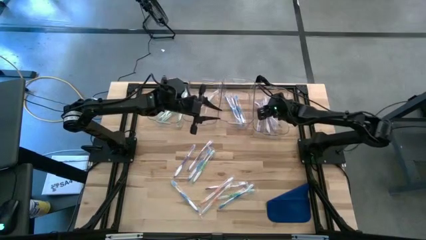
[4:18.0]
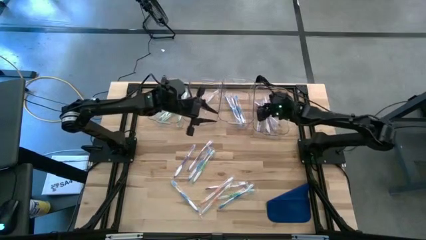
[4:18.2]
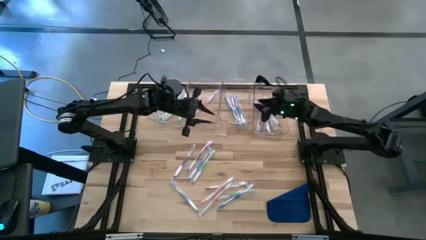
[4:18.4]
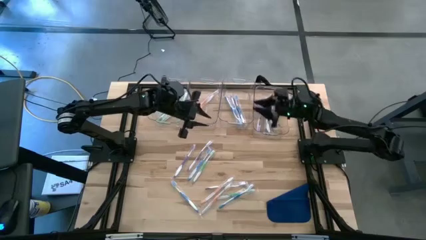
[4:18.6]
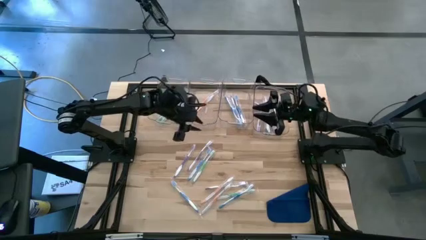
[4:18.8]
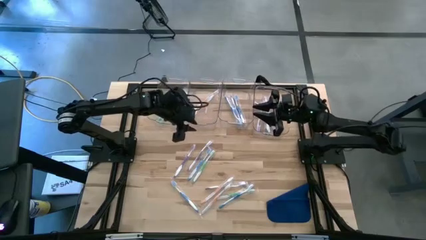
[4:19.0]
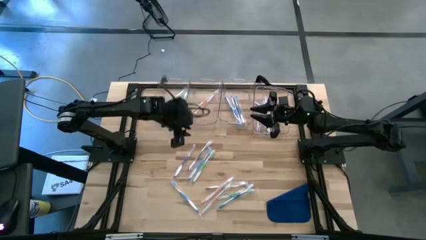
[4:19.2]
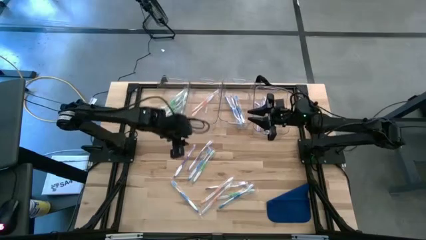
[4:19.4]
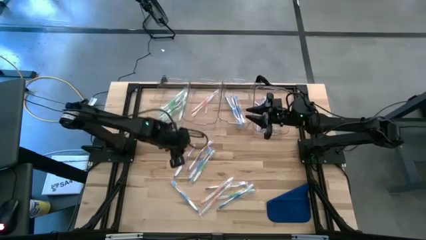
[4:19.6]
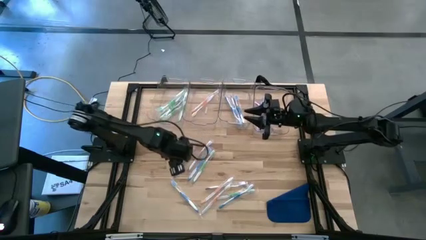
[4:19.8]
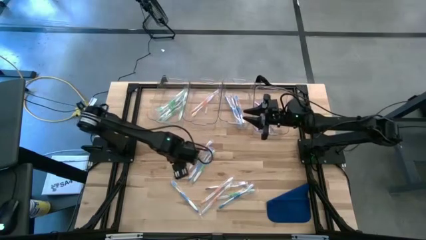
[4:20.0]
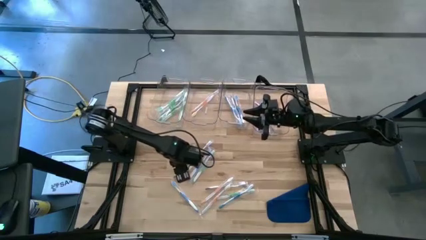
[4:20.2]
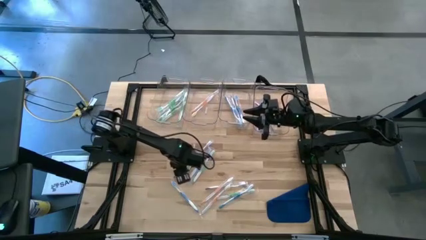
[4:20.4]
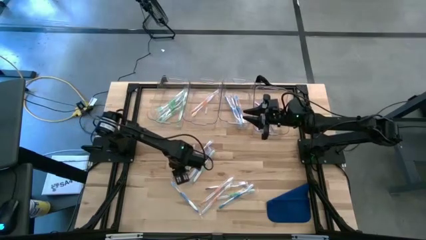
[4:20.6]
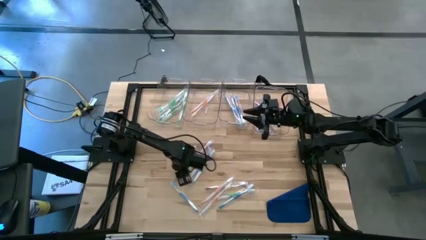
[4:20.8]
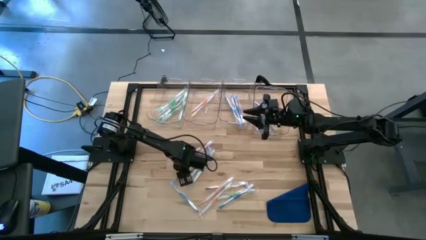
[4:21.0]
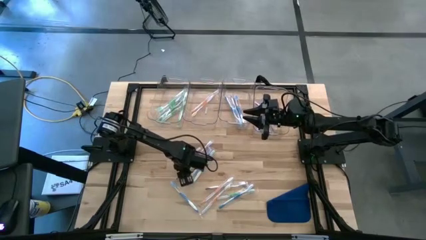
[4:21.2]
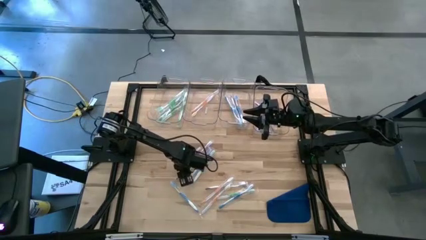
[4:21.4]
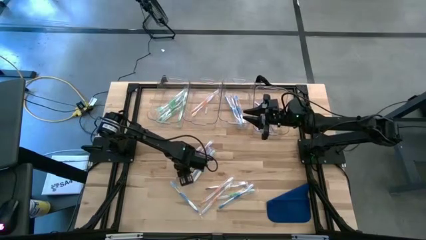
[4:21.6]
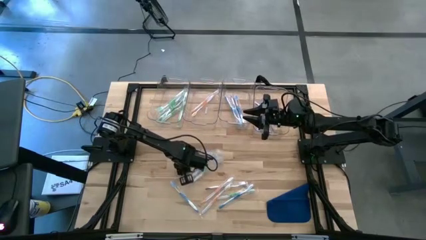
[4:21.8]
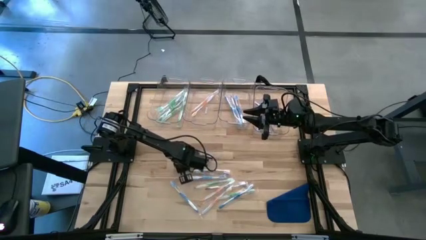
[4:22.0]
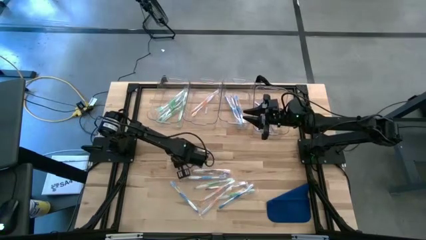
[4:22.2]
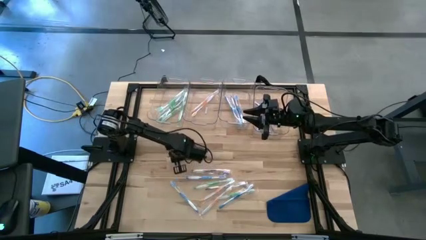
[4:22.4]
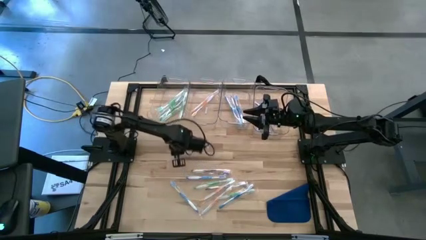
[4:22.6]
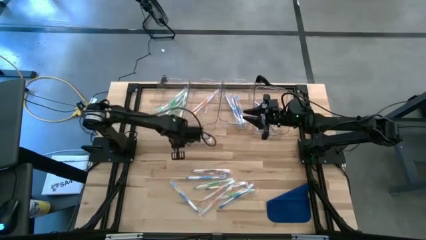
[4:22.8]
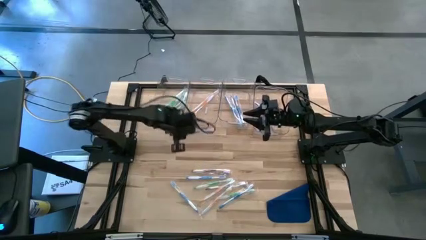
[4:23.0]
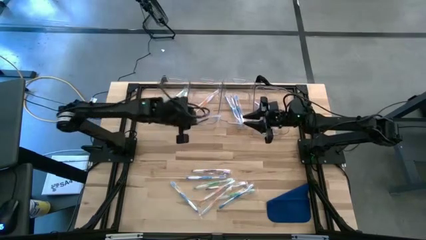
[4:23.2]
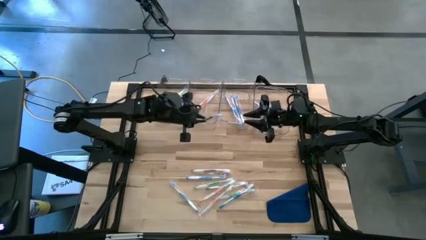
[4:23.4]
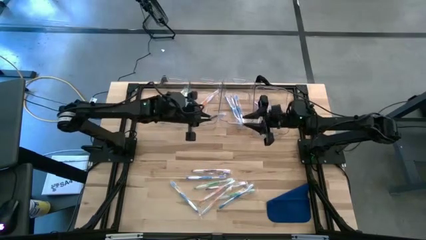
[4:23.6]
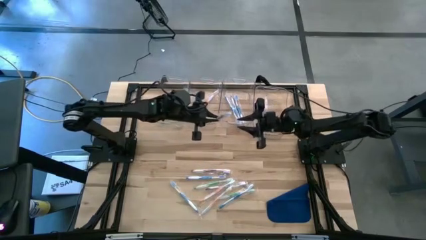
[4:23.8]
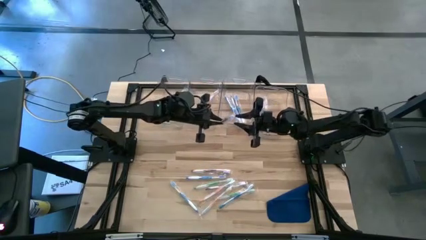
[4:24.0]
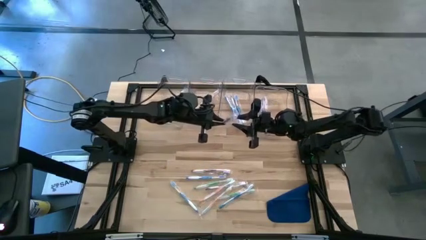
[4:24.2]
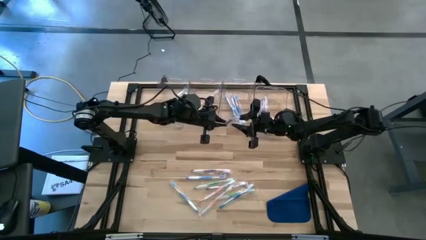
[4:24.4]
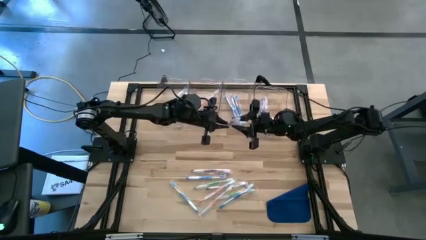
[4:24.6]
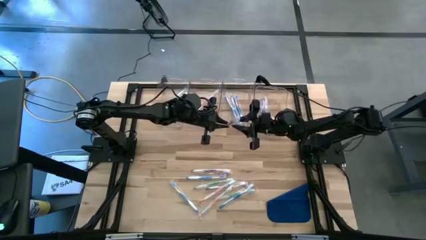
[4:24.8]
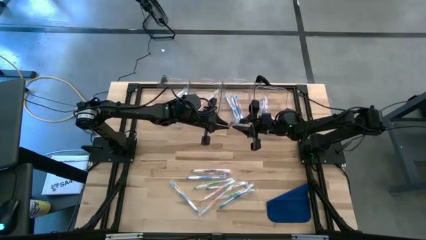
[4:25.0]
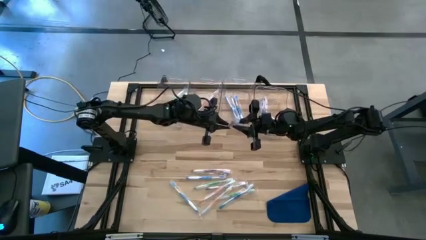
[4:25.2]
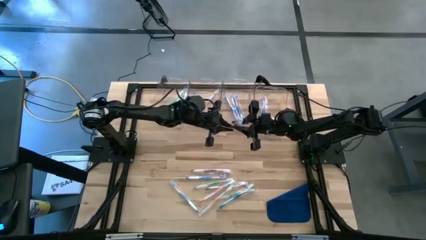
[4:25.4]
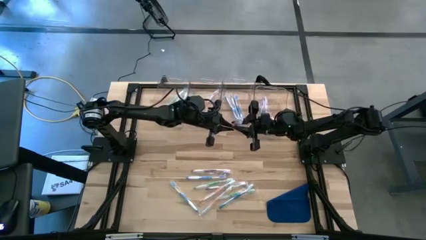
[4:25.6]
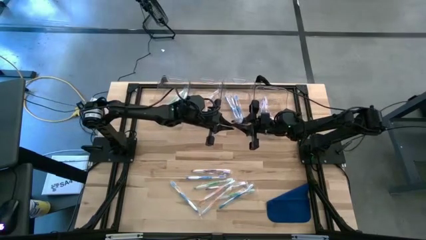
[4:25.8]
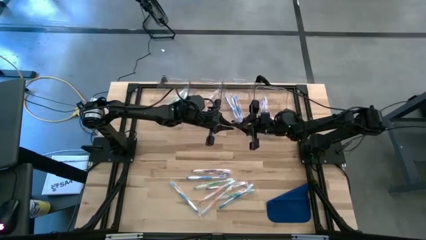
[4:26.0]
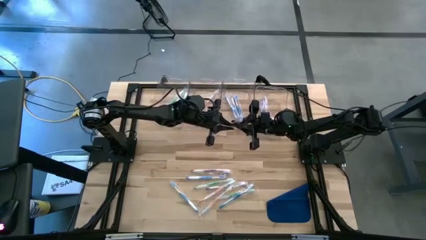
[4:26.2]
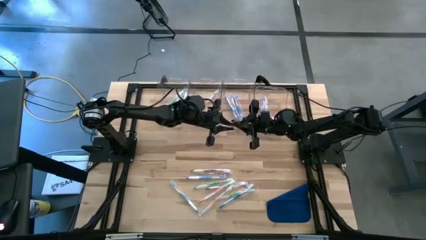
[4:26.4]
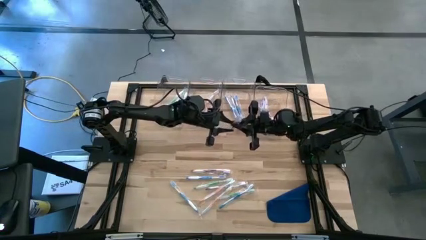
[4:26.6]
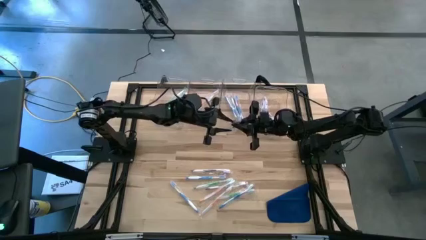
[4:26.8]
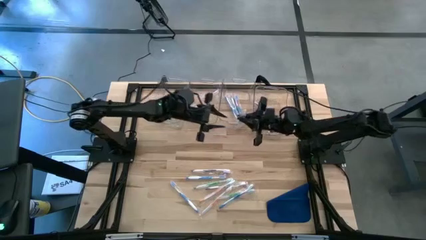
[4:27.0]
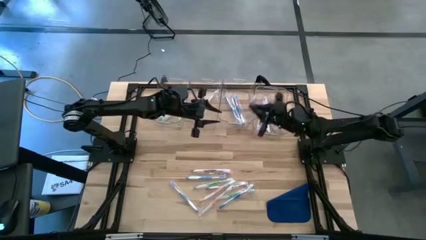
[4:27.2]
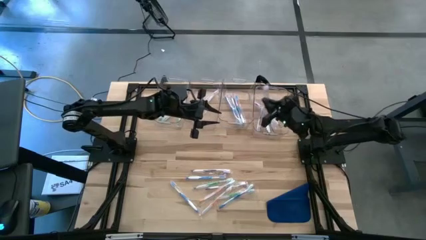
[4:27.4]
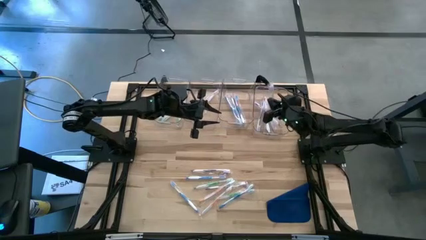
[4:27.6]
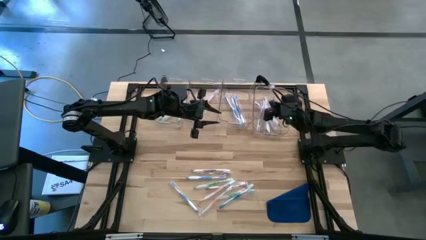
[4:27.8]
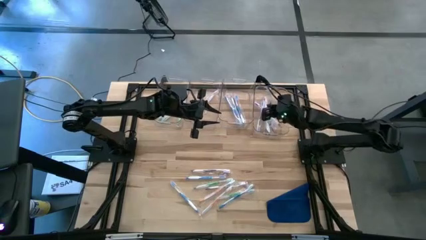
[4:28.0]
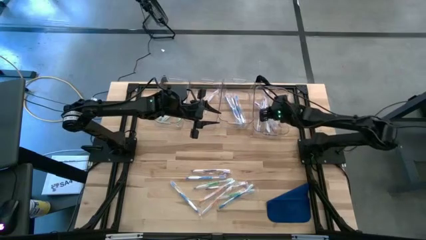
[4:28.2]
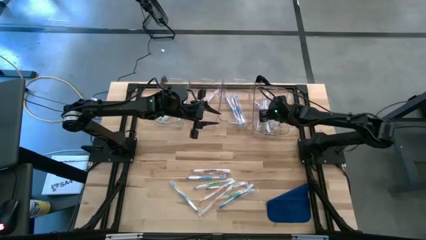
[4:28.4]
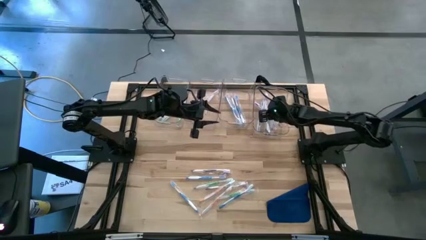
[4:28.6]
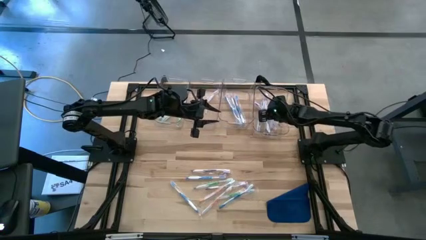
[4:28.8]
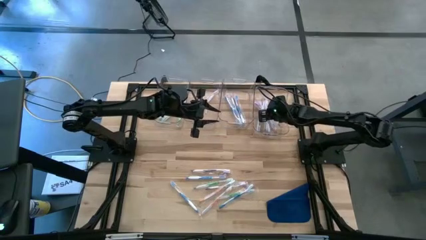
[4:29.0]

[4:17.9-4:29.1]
Task: Pick & Place Toothbrushes
Put the violet toothbrush into the right transparent bin

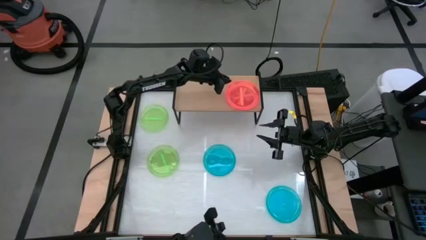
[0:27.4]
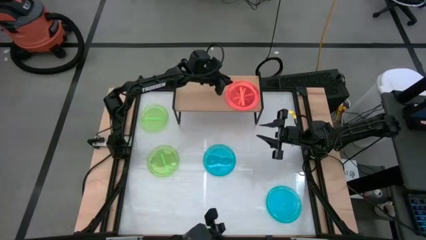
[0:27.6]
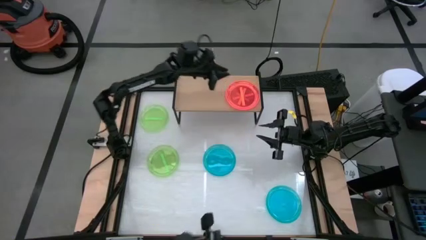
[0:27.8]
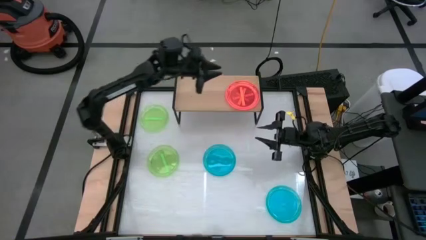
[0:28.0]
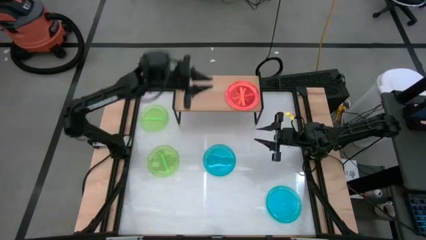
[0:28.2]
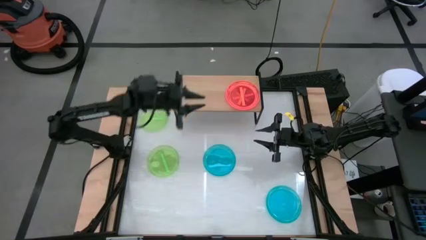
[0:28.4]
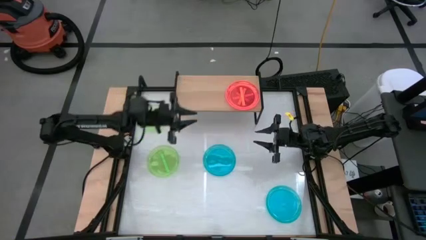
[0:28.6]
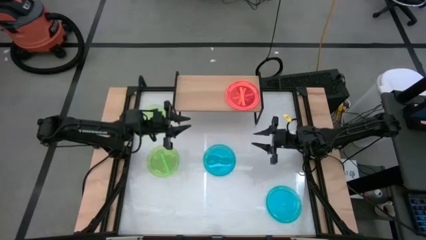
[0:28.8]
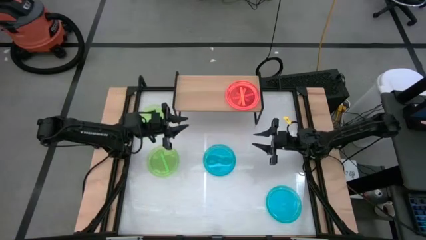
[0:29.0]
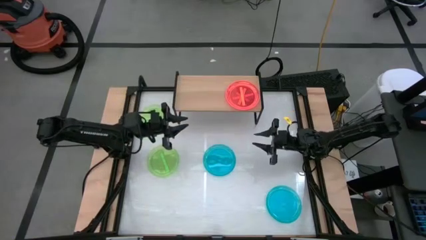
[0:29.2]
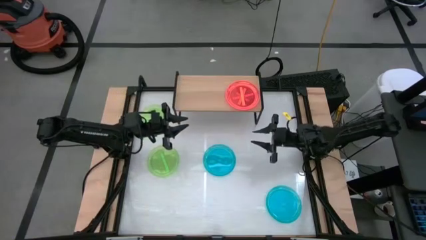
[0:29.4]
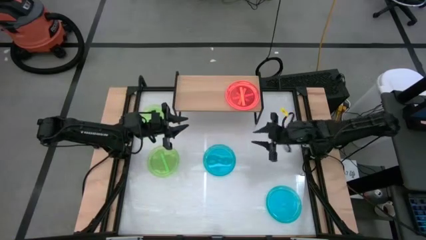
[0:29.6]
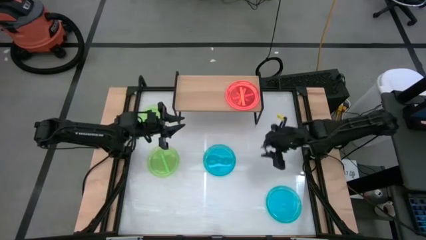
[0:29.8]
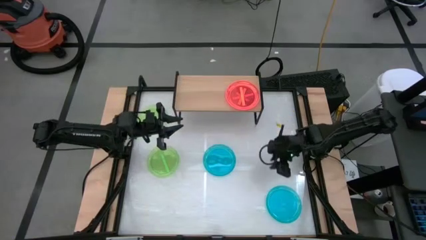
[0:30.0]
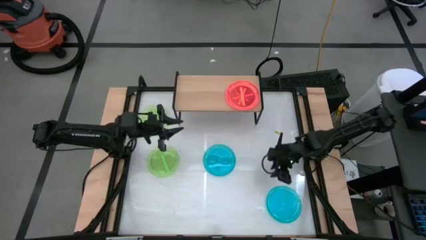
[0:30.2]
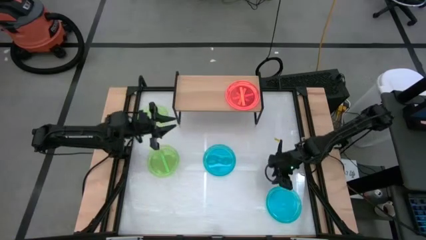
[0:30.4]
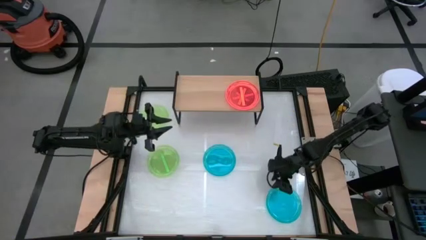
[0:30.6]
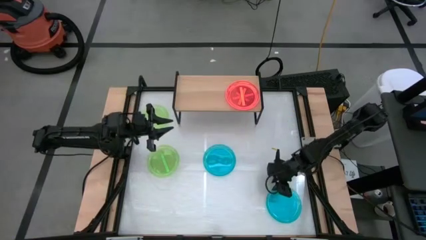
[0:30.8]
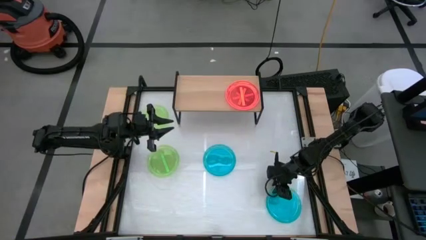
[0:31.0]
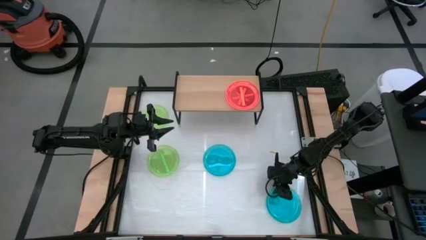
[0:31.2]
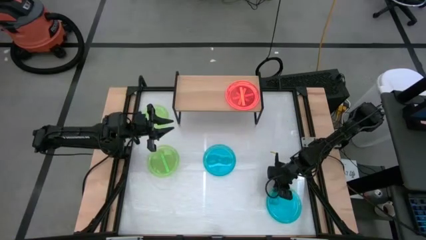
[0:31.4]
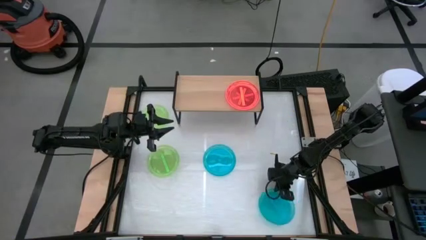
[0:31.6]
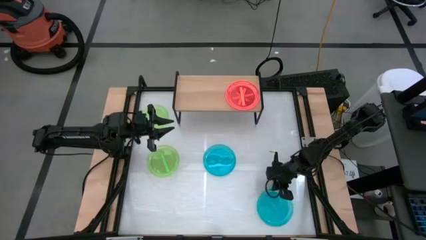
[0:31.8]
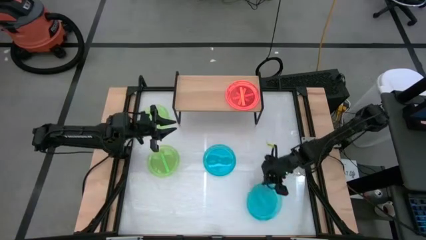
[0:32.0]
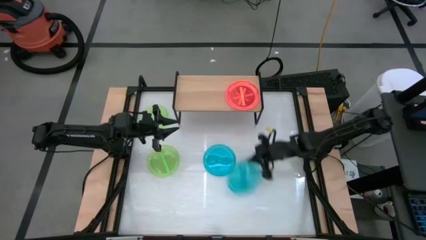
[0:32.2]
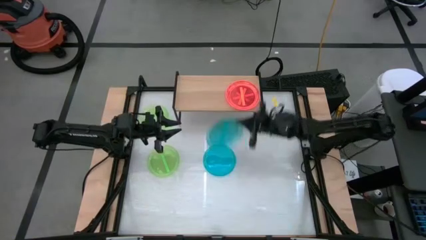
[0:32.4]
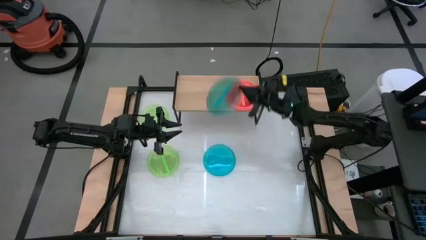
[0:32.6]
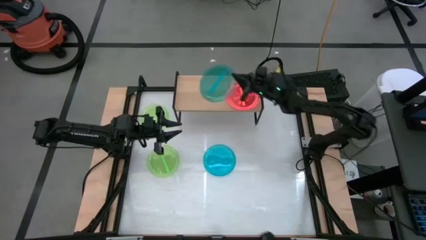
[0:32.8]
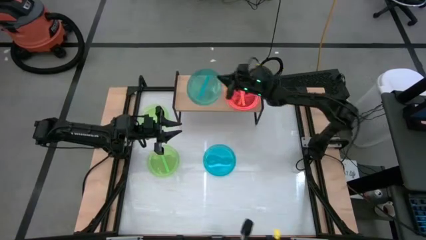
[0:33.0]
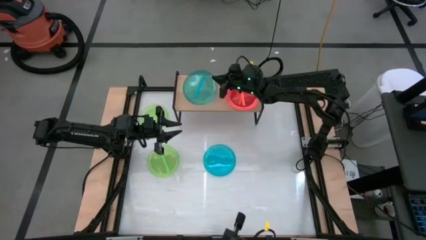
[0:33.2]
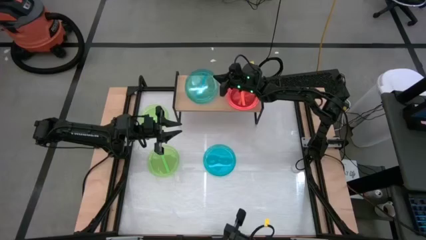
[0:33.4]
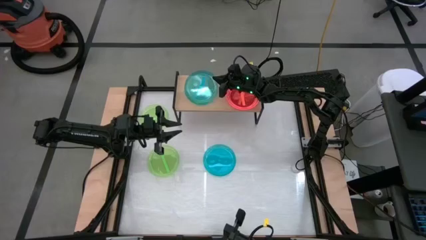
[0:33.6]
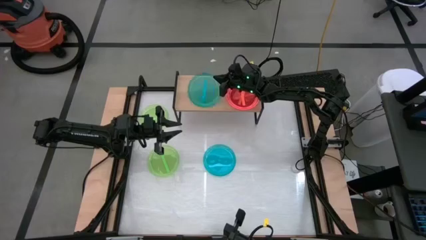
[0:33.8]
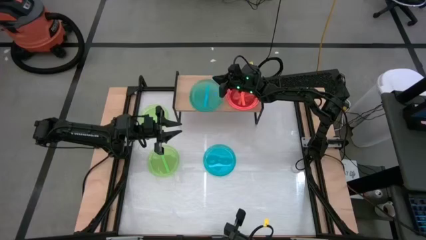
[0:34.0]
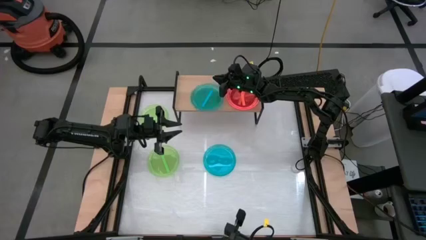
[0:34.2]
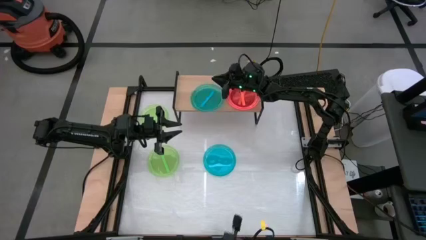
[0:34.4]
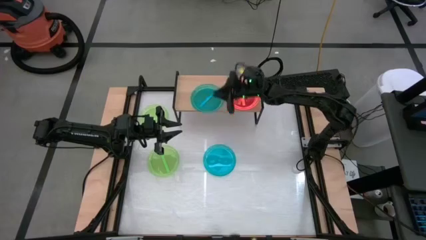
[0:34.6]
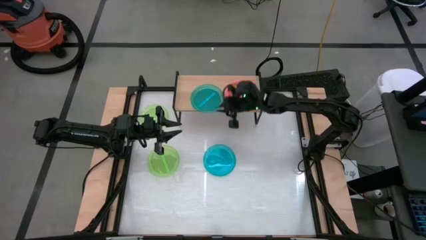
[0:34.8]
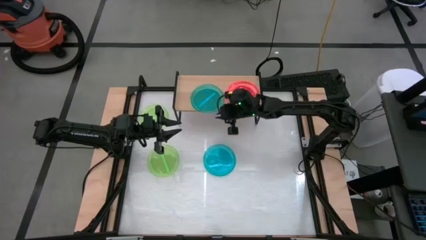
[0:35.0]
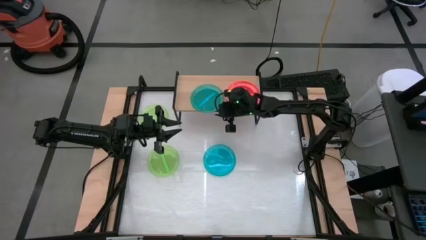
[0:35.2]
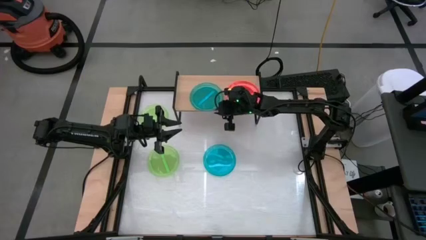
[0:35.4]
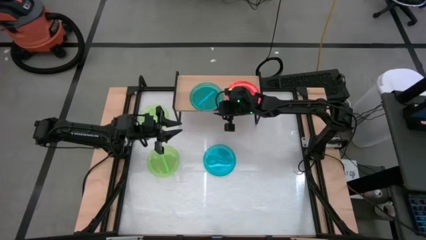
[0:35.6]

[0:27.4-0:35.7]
Task: Place and stack plates onto a shelf
Put the bottom blue plate on the shelf
